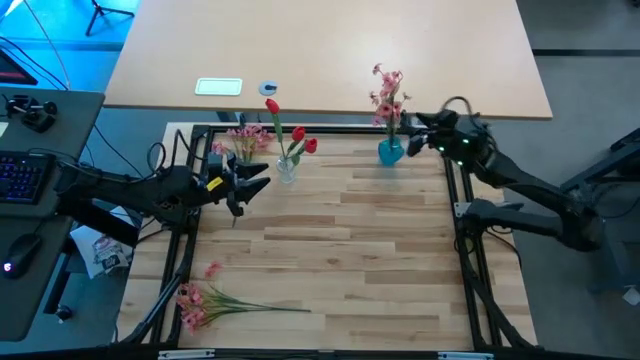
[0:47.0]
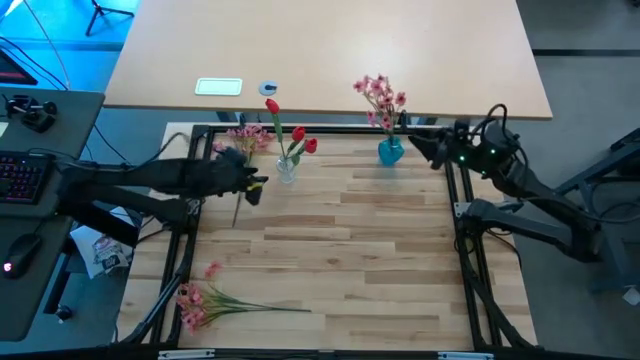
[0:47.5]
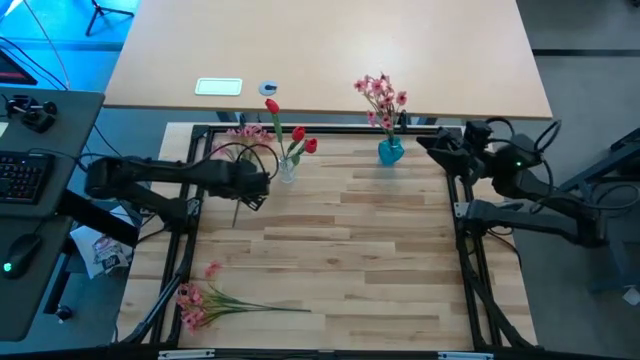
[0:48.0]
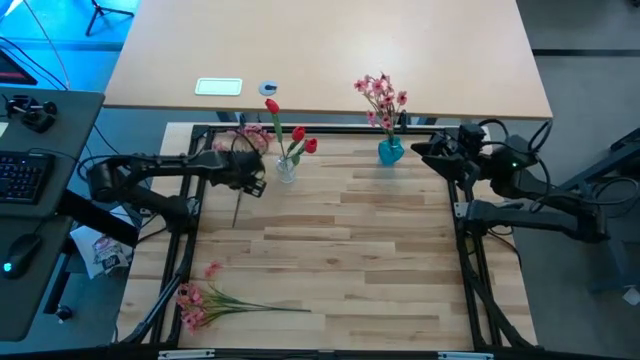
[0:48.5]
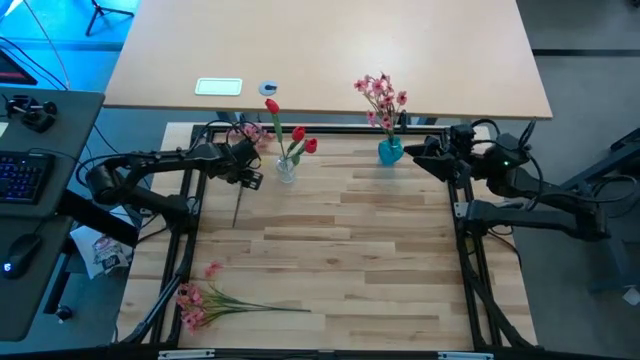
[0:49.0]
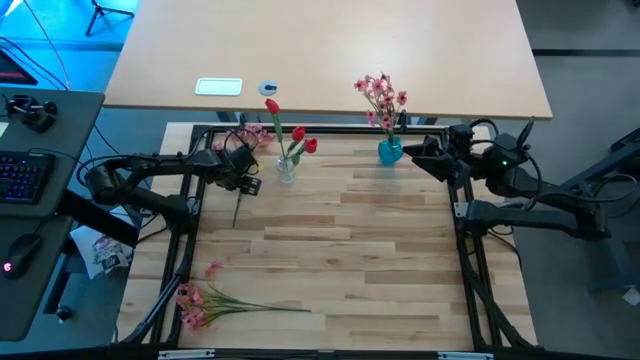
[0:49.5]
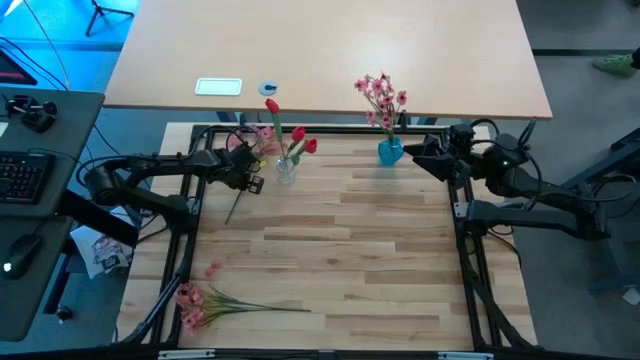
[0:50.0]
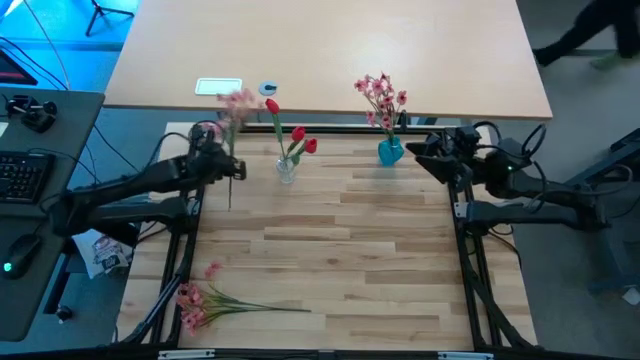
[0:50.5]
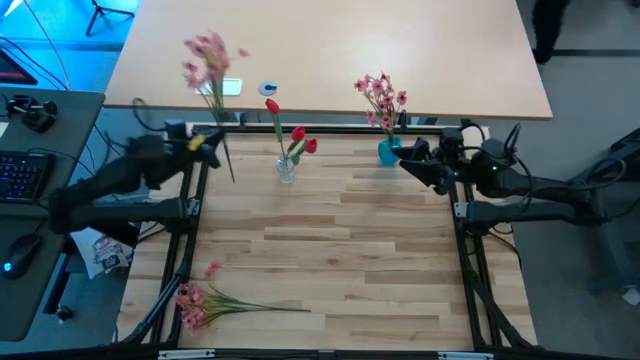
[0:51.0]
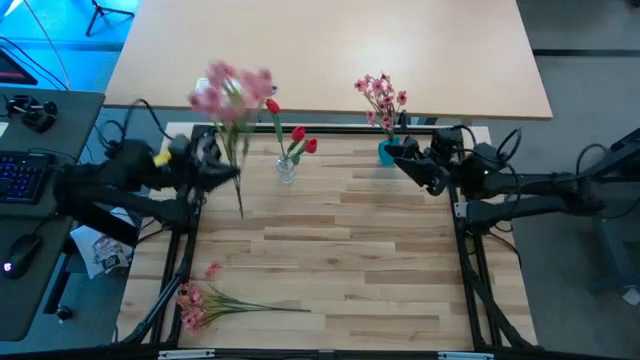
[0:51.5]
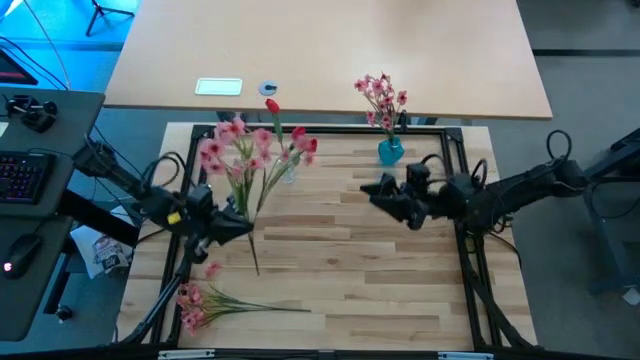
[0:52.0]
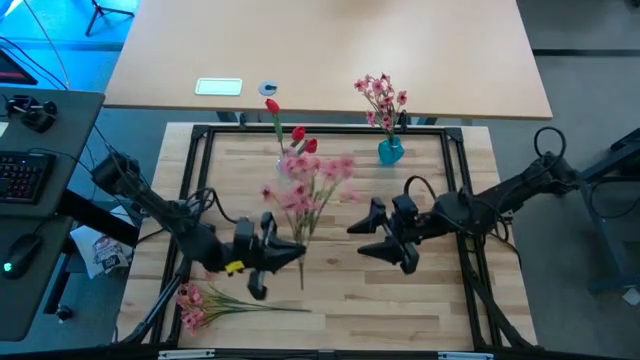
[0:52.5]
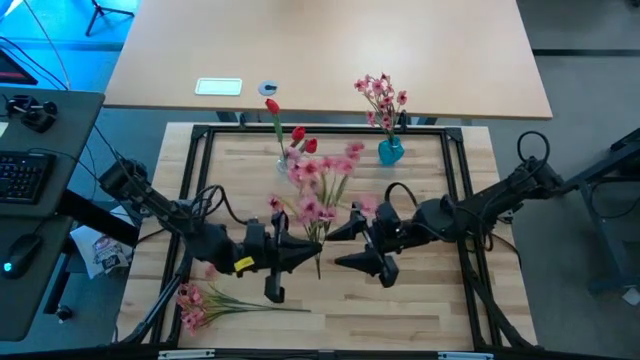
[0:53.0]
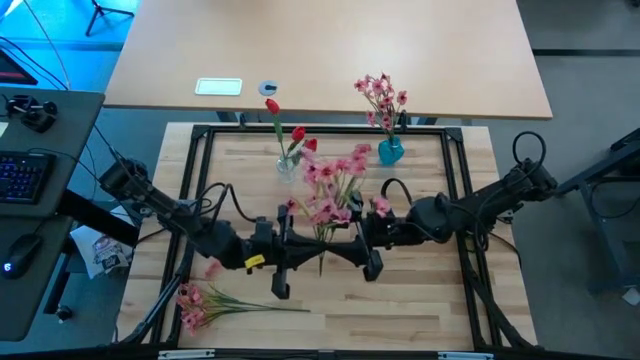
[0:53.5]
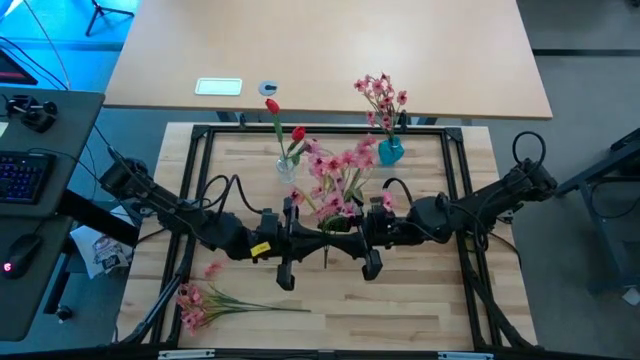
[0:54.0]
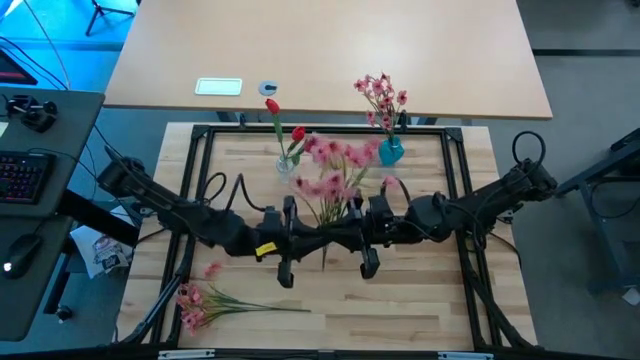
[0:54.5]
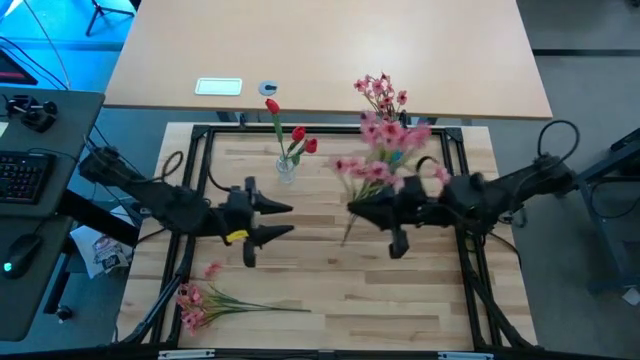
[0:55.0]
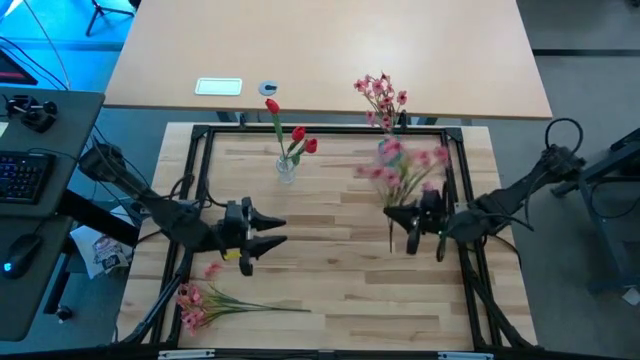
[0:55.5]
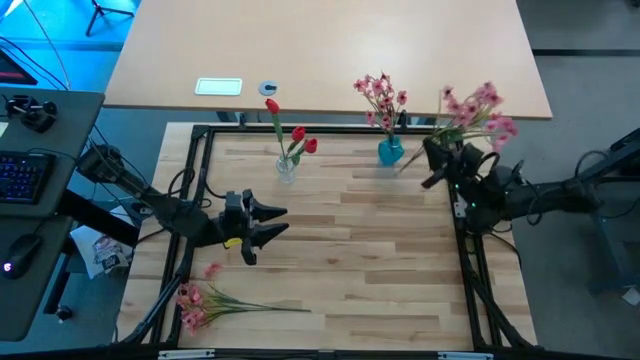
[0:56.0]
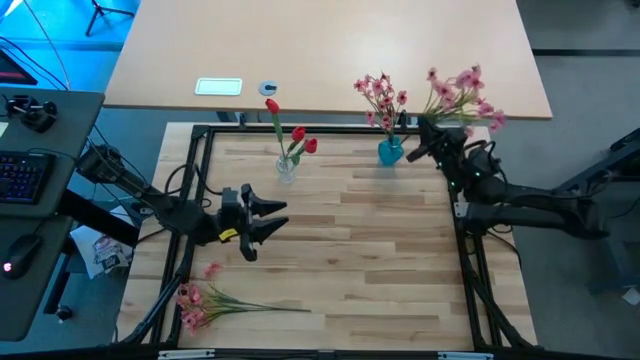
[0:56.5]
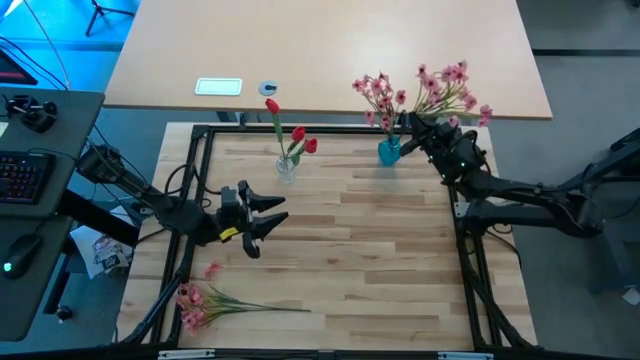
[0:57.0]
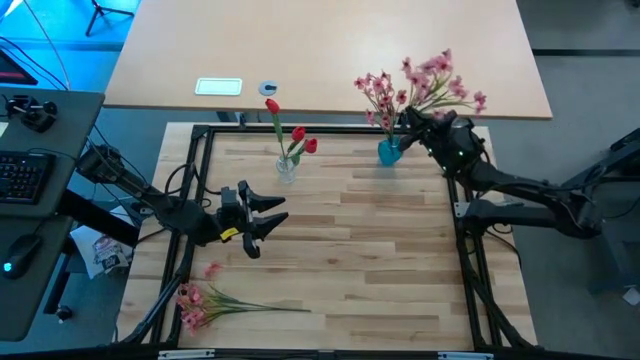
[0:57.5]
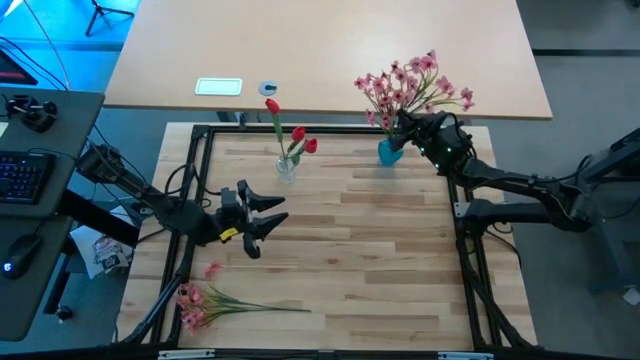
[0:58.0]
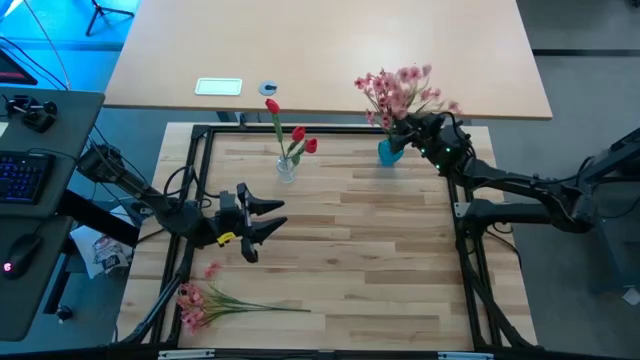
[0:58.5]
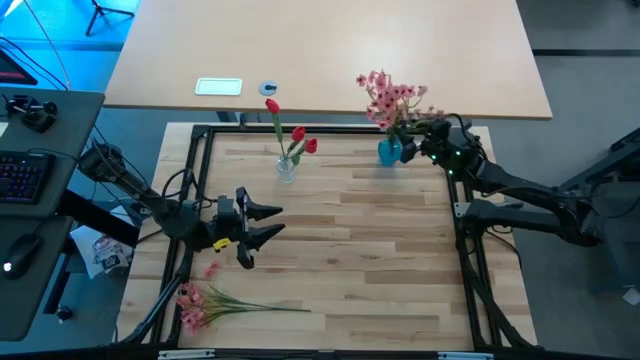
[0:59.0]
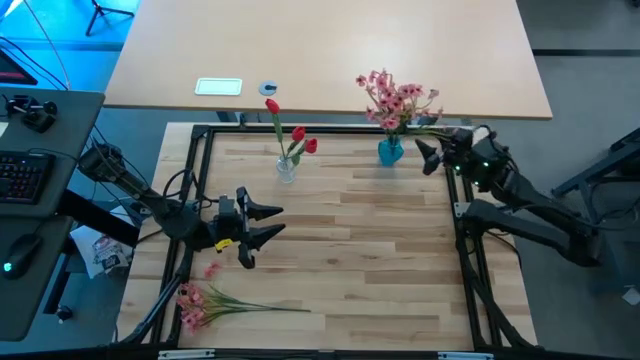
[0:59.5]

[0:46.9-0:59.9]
Task: Sort flowers into vase by color
Put the top pink flowers into the blue vase

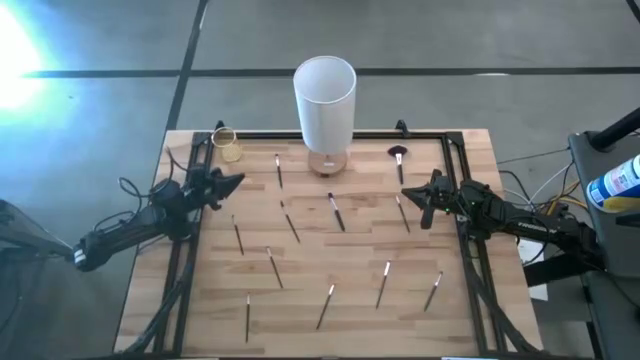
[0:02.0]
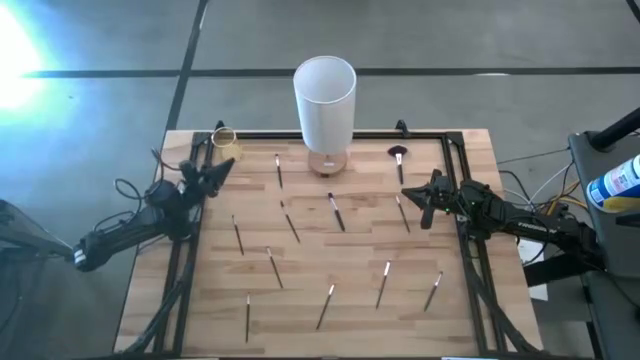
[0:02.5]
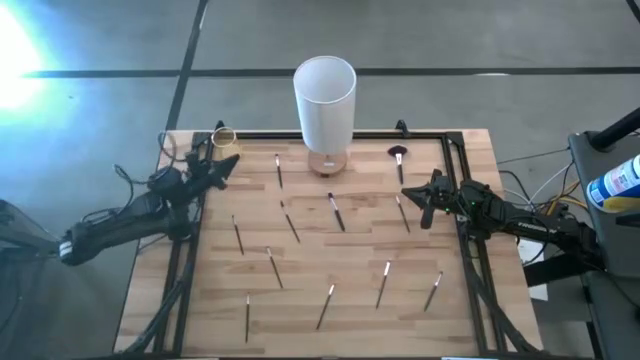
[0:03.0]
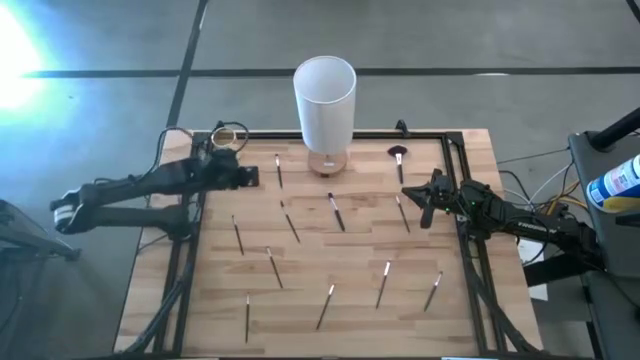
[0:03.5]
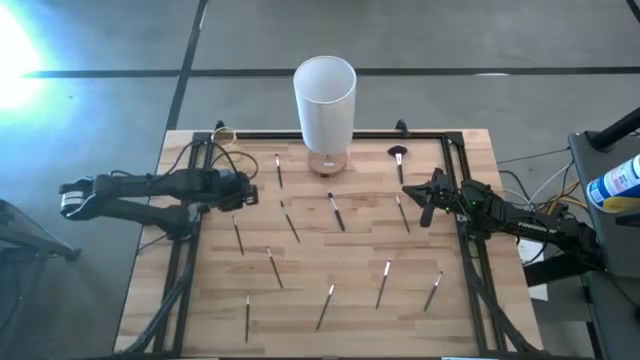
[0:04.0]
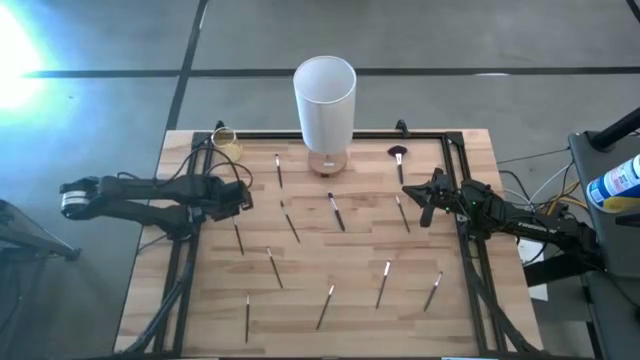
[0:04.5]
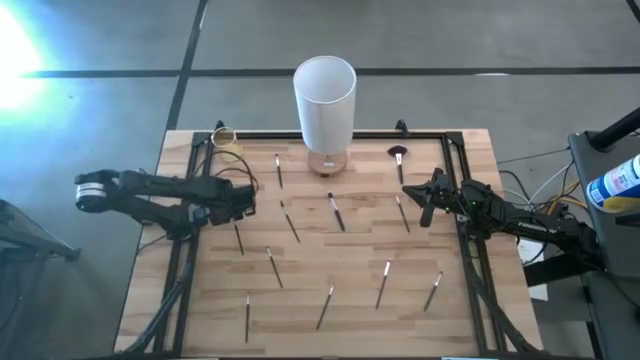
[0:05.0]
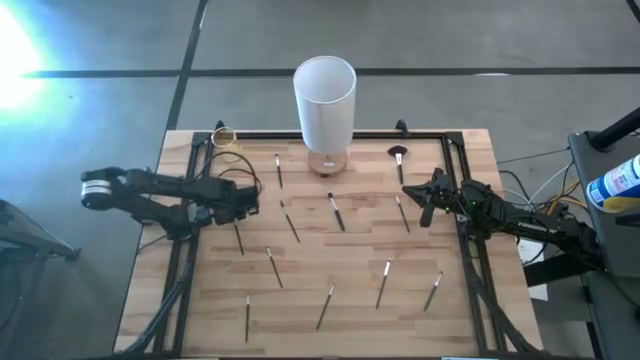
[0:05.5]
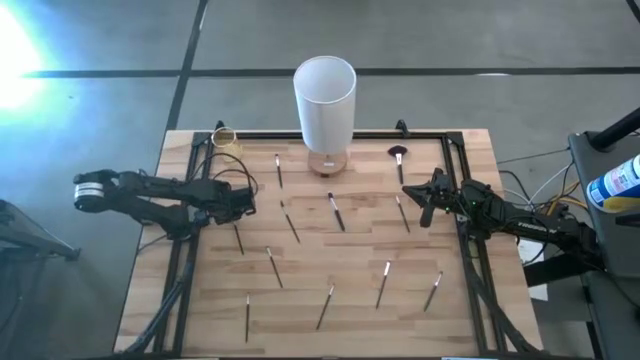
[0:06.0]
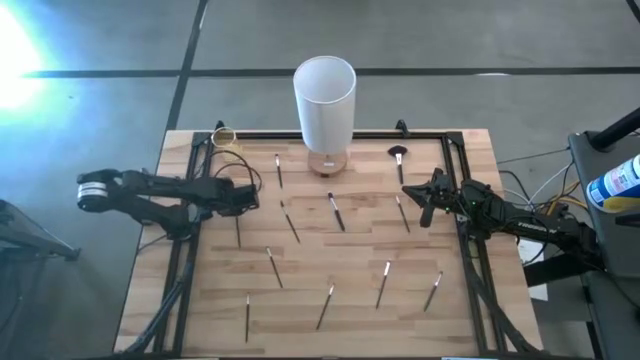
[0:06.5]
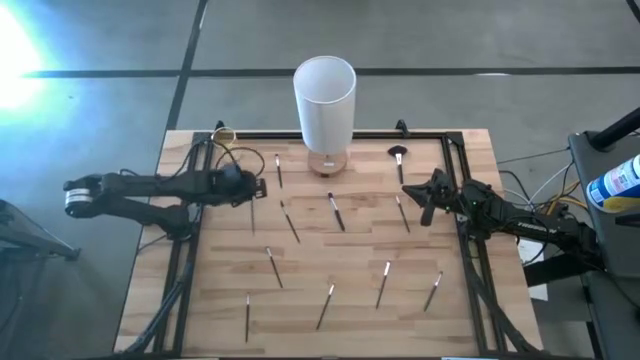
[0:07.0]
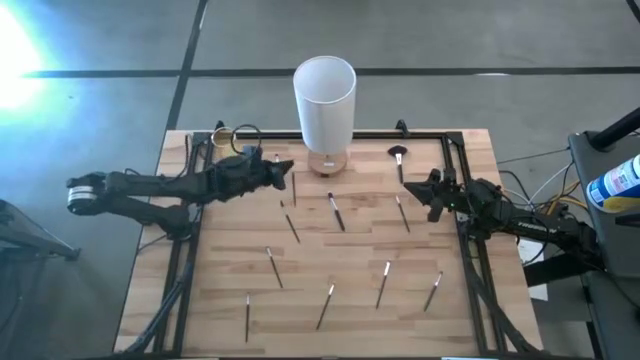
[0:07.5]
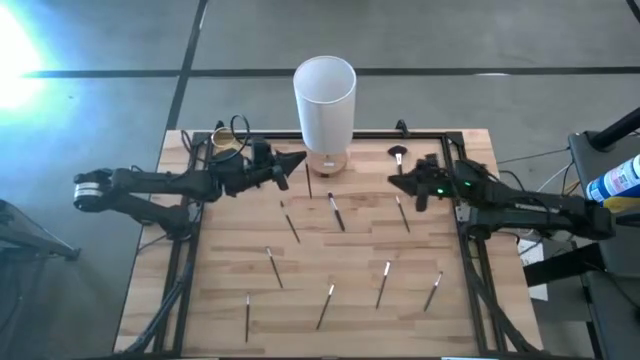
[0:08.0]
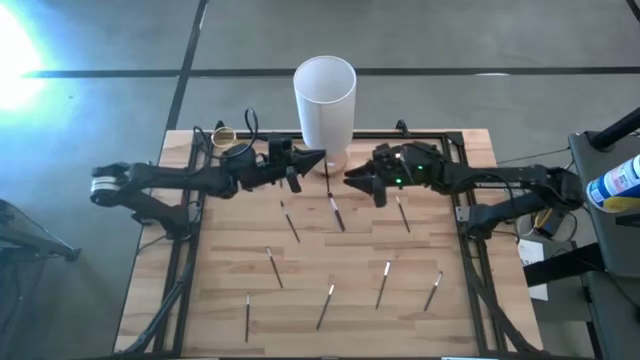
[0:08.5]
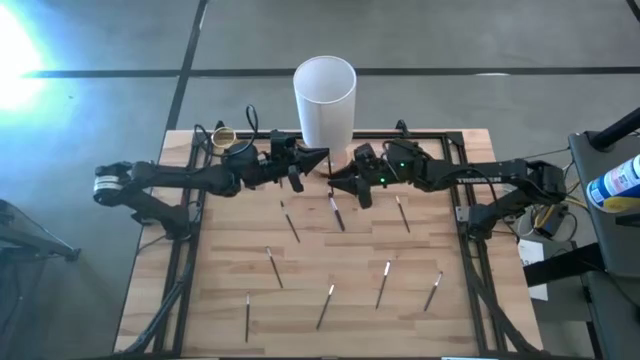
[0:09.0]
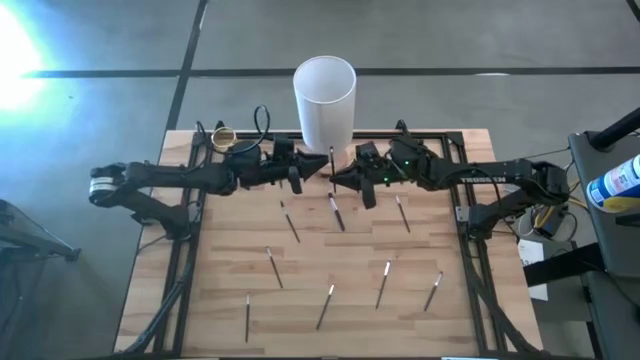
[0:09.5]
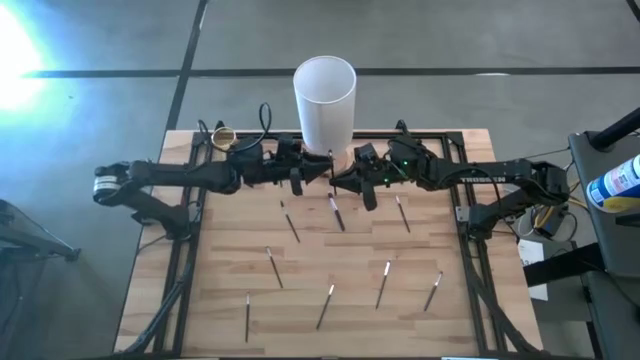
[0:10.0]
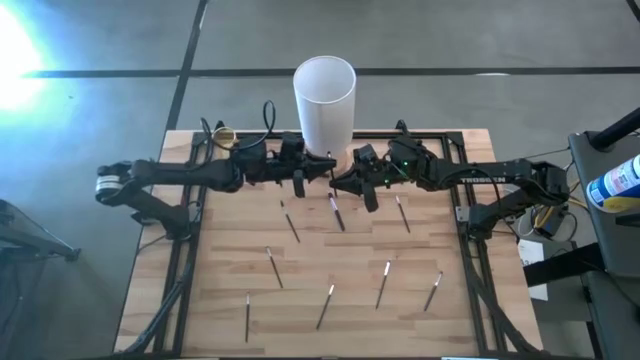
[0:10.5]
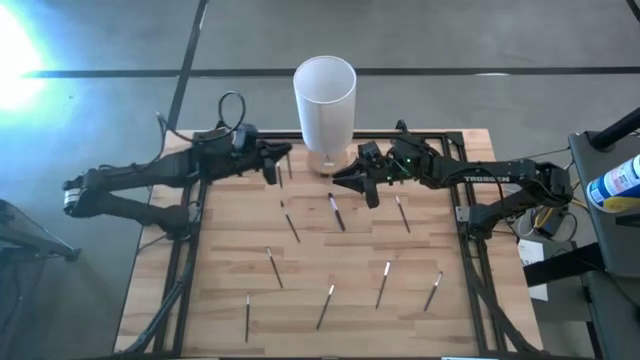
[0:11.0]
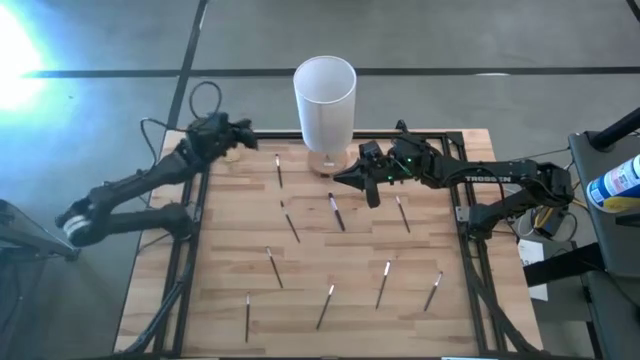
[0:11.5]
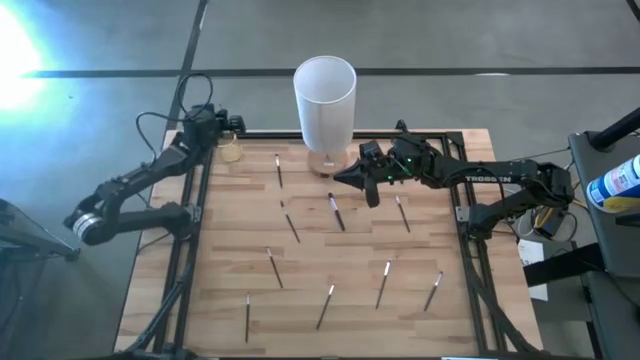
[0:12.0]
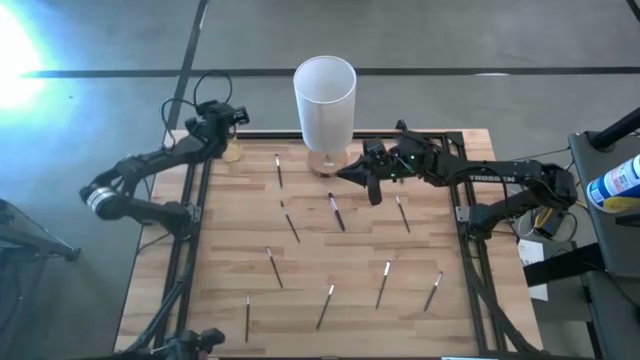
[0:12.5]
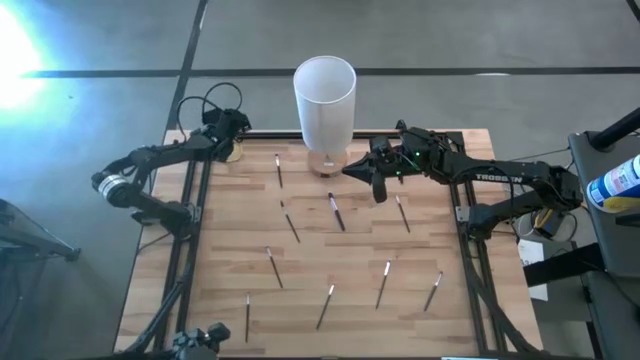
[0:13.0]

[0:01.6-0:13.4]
Task: Pick & Place Makeup Brushes
Put the eyeshadow brush into the makeup holder
